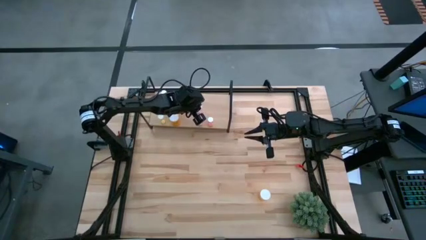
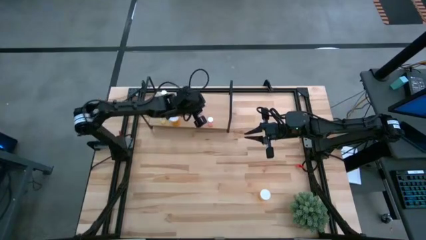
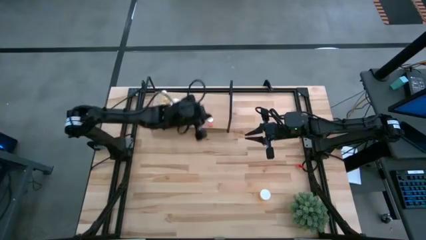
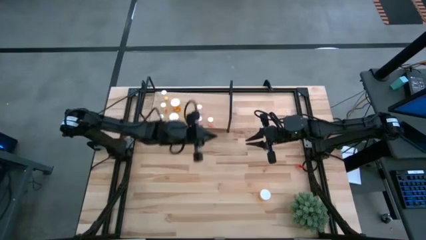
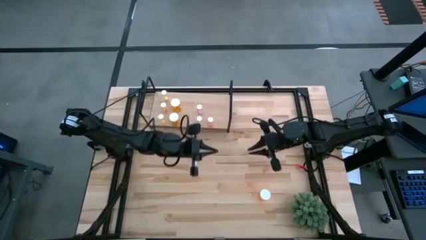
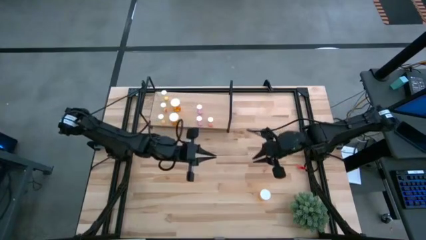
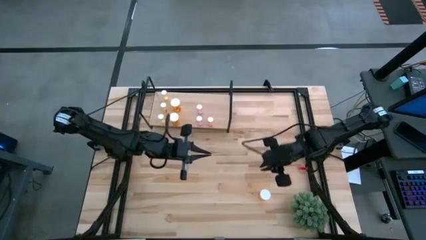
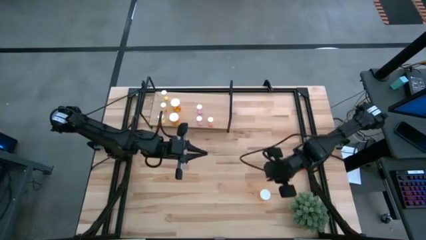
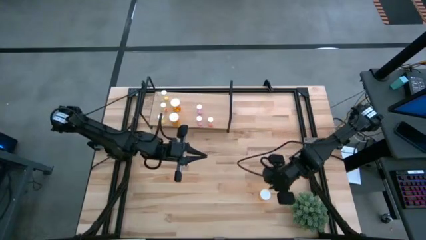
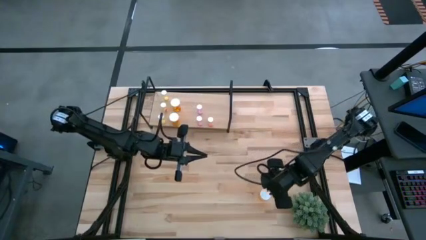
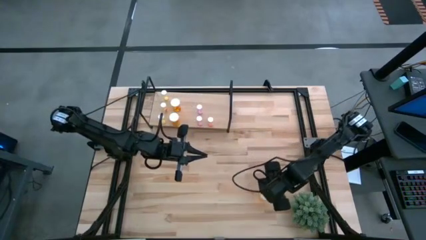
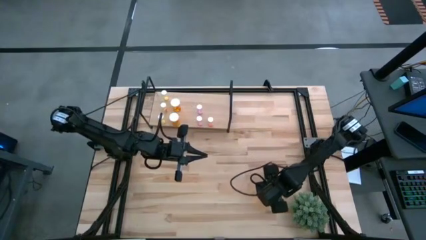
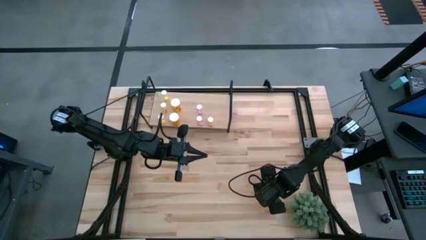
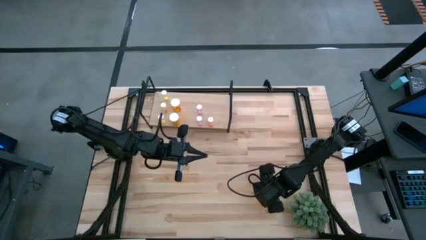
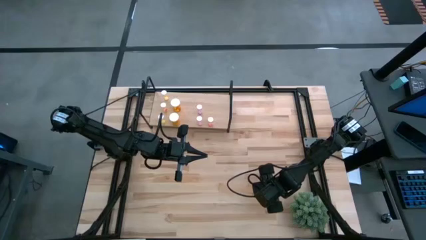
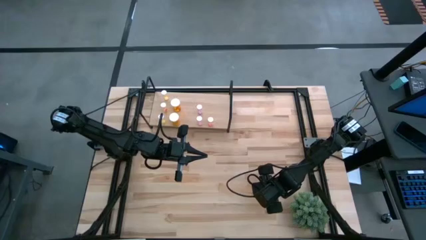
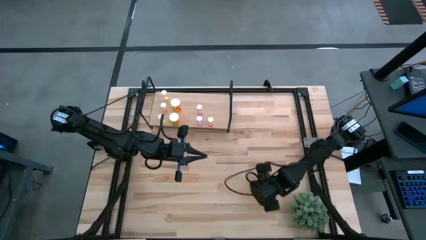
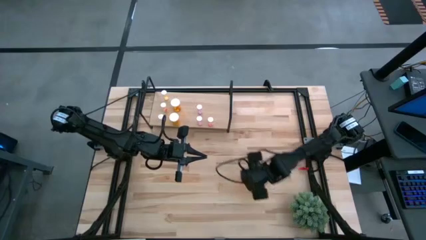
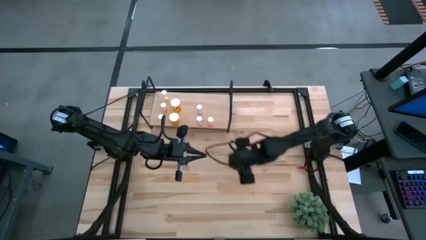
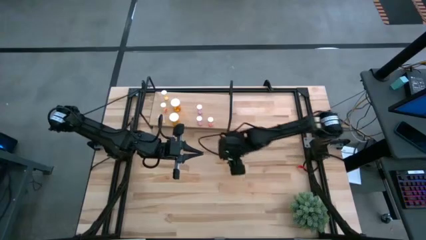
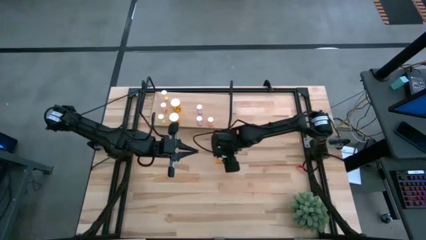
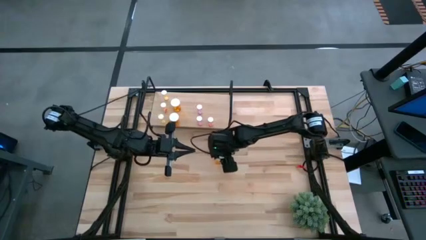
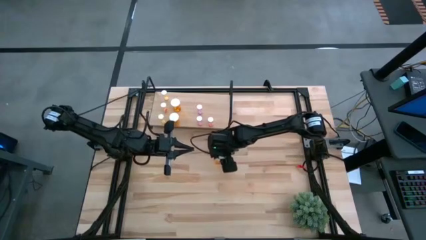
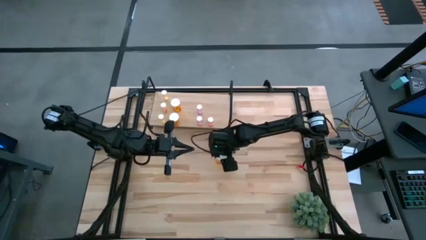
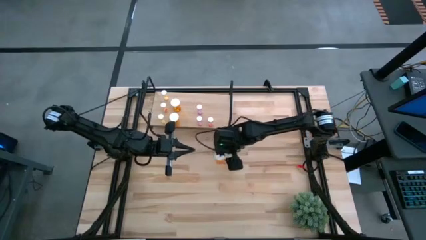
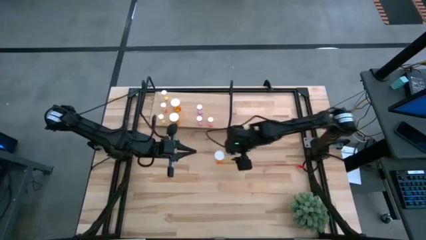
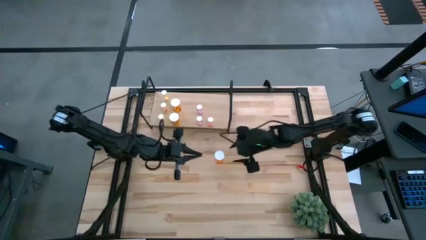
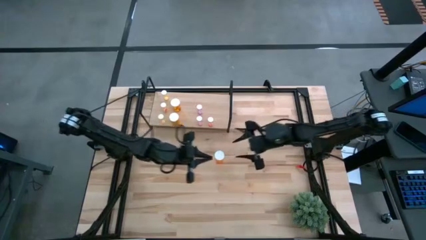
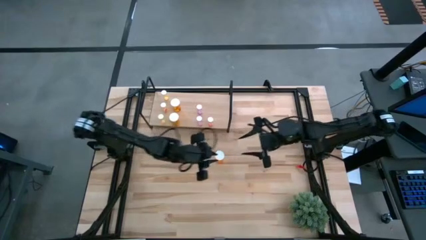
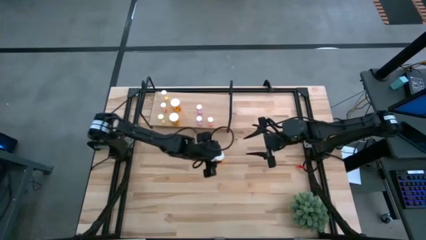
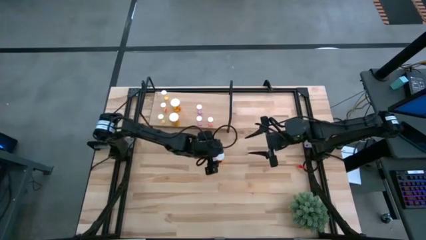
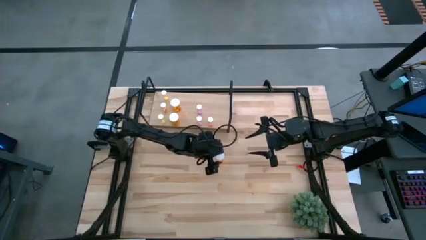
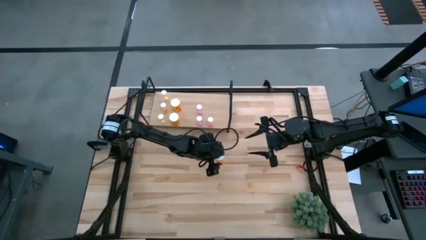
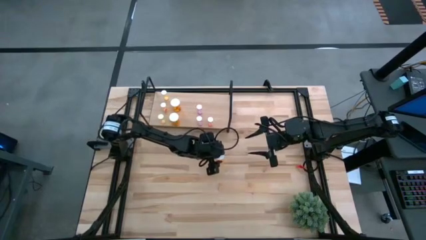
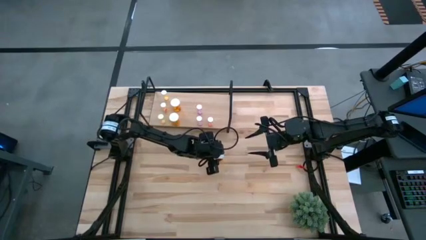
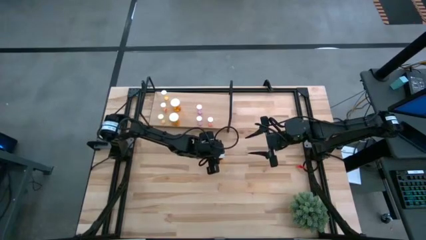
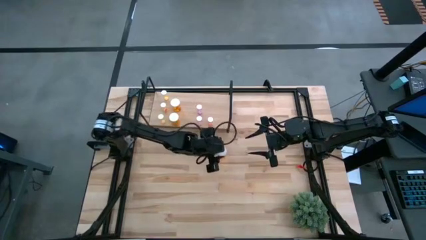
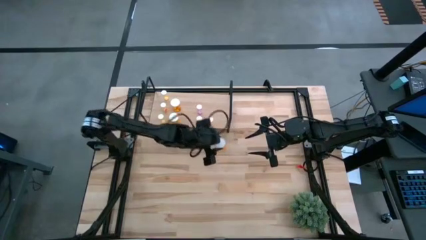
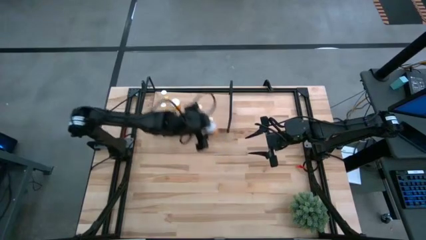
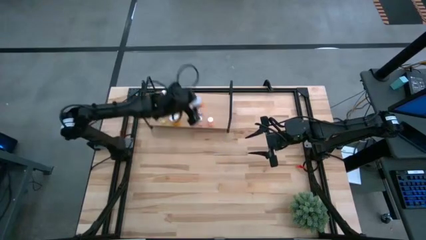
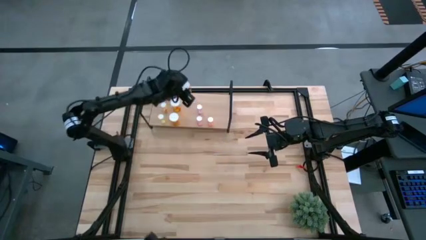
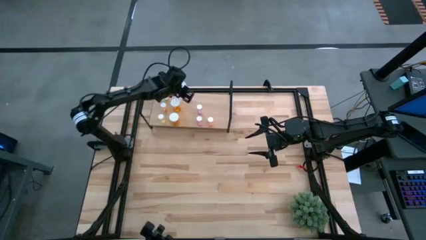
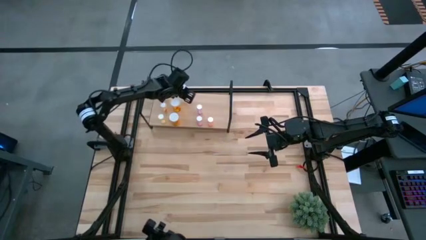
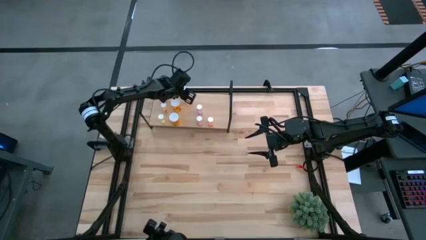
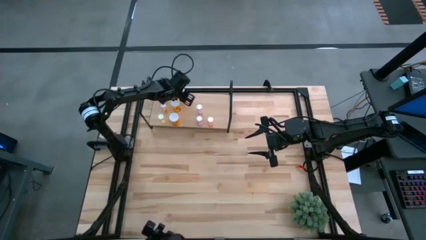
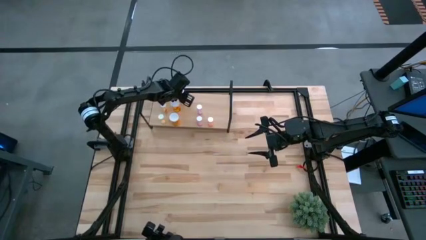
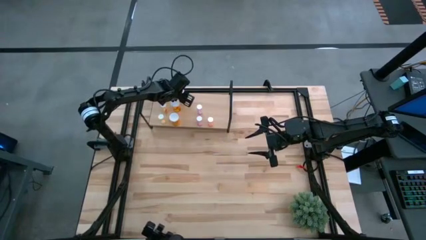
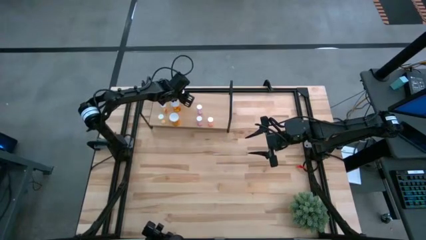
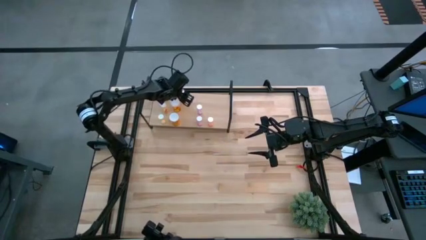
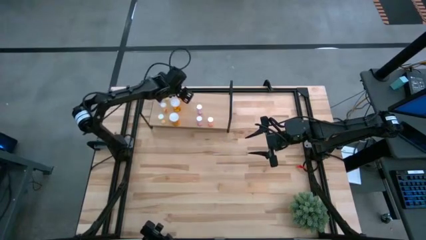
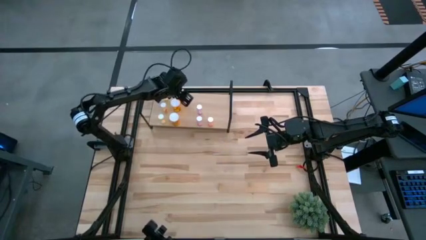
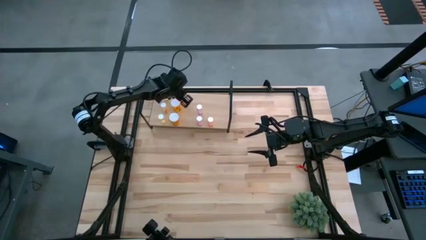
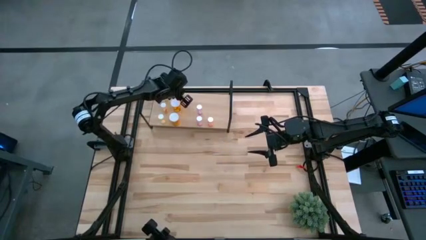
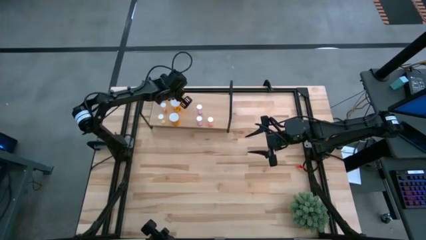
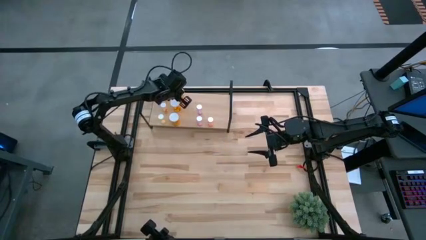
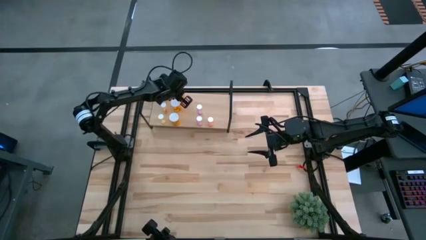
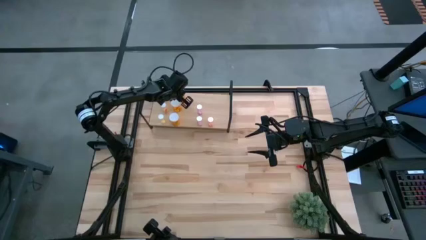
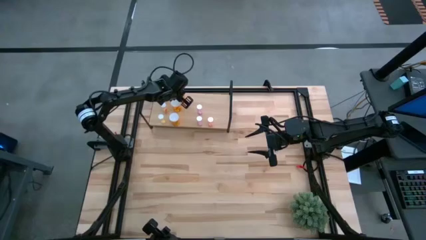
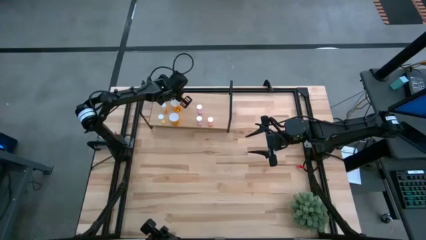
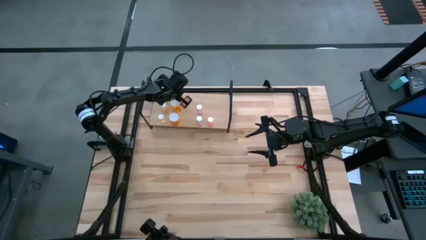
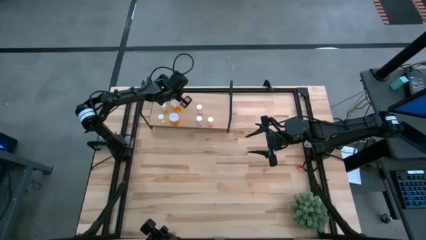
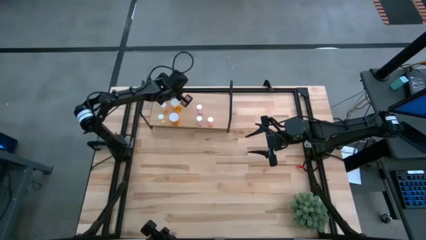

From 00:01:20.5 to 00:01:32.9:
Task: Pick and place medicine bottles onto shelf by color
Put the orange pill bottle on the shelf to align with the orange pill bottles

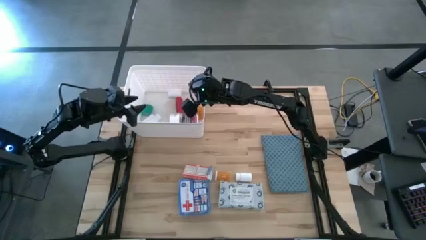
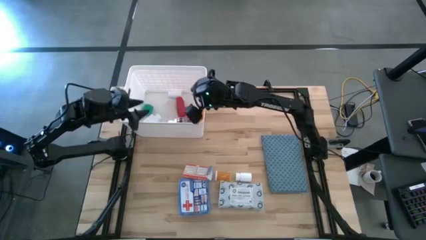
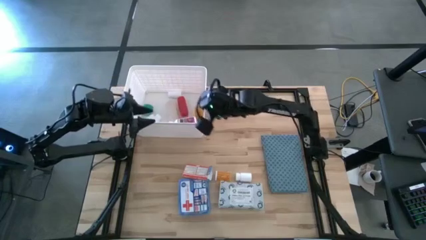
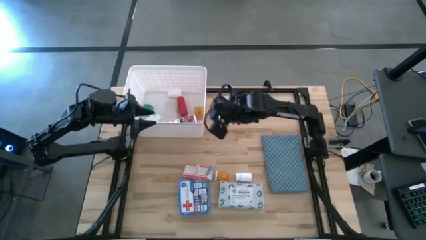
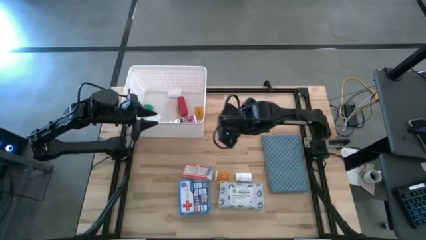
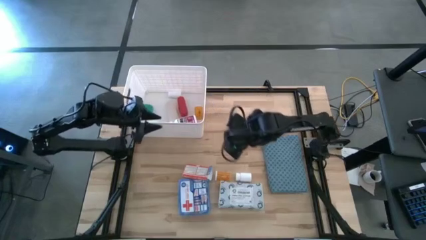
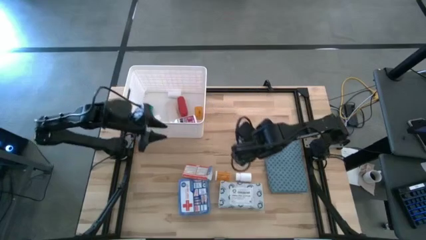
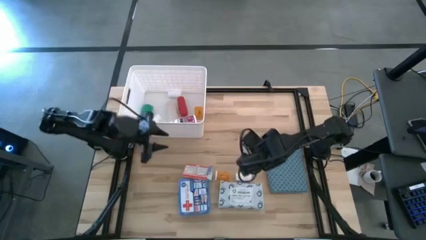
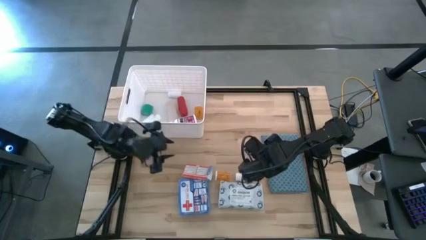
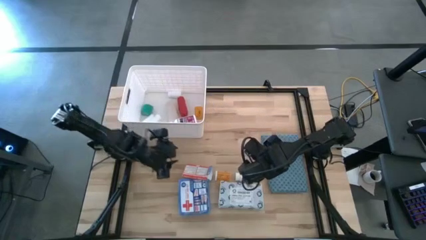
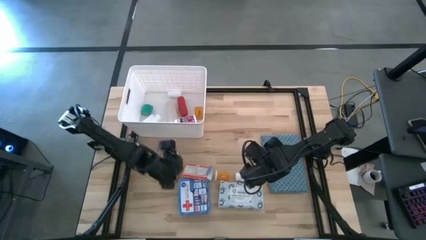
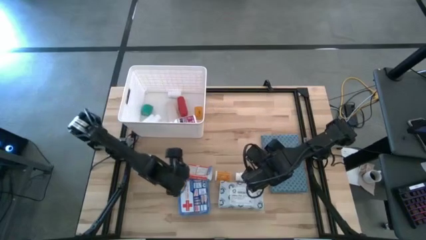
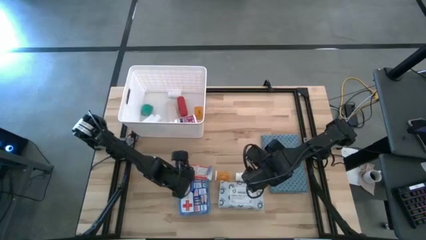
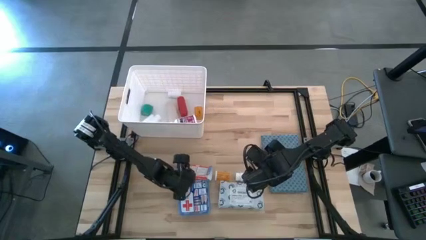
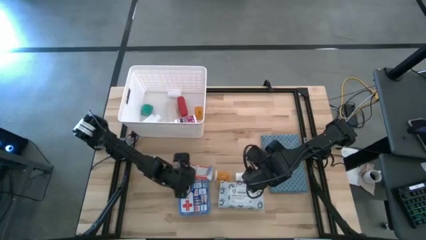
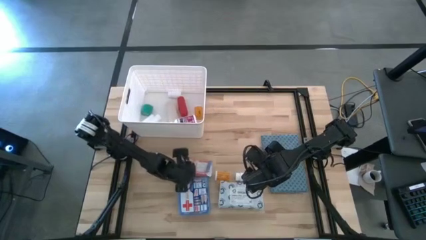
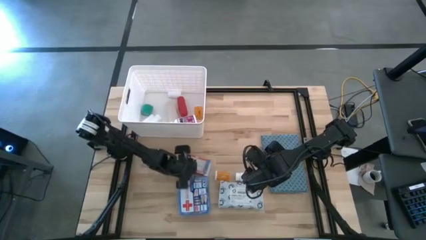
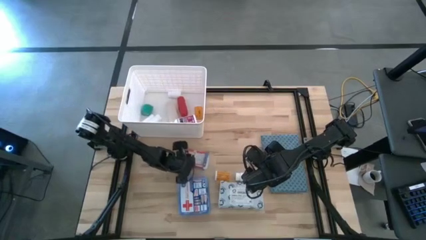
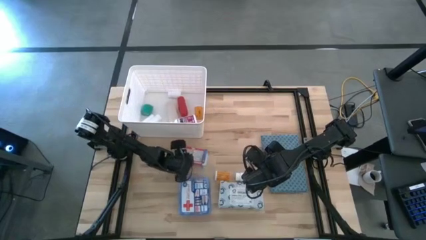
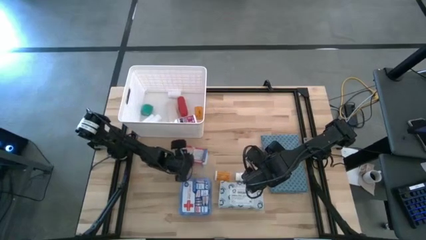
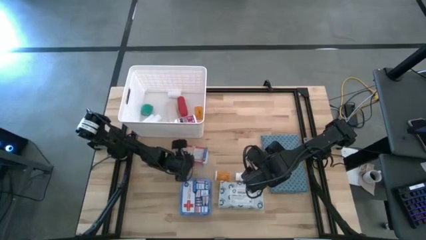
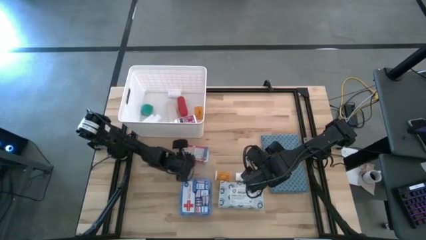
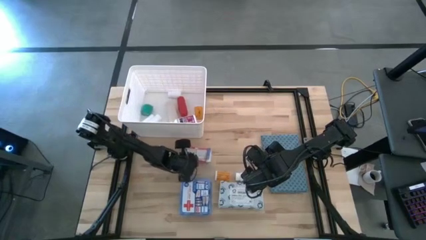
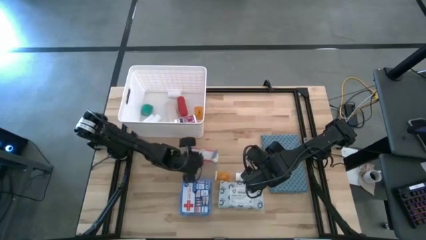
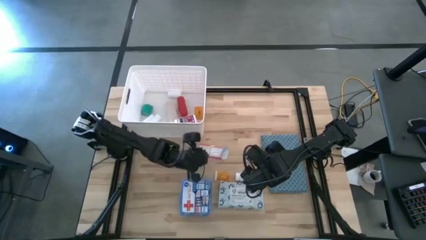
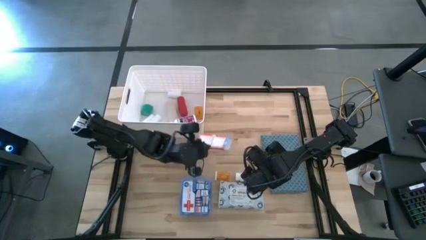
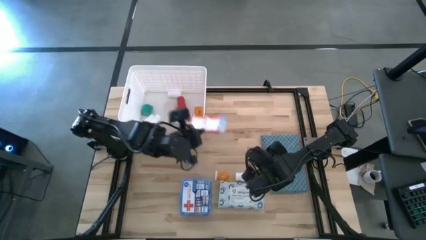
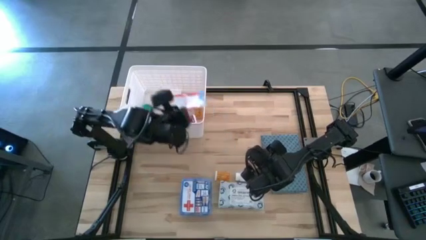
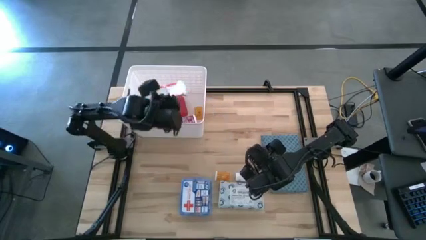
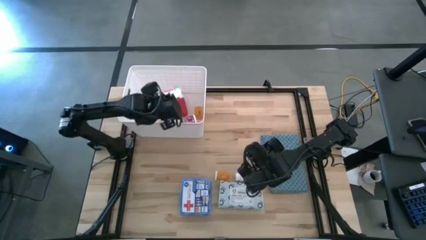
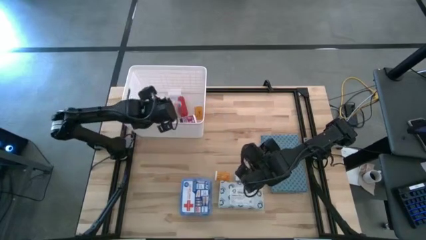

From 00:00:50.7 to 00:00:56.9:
Task: Pick & place medical supplies in basket/bin
Put the red medicine box into the white bin
